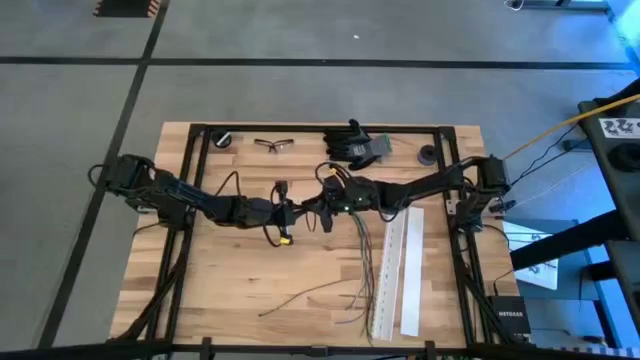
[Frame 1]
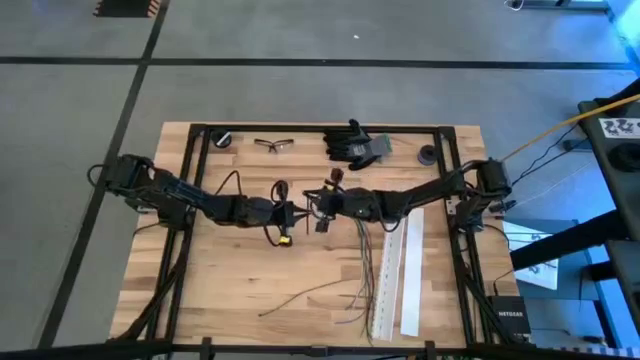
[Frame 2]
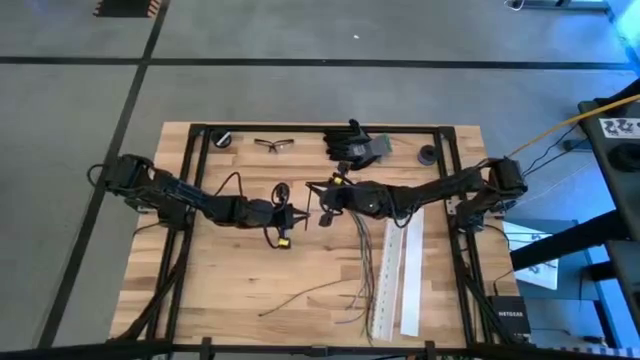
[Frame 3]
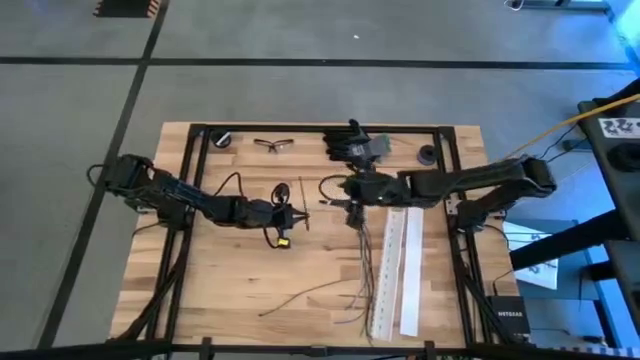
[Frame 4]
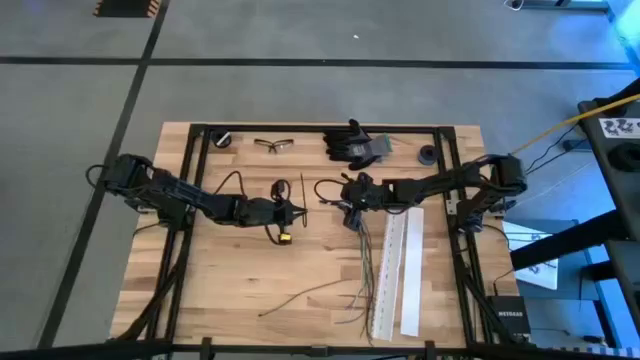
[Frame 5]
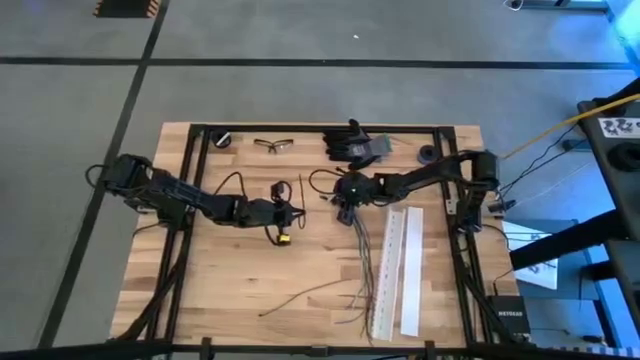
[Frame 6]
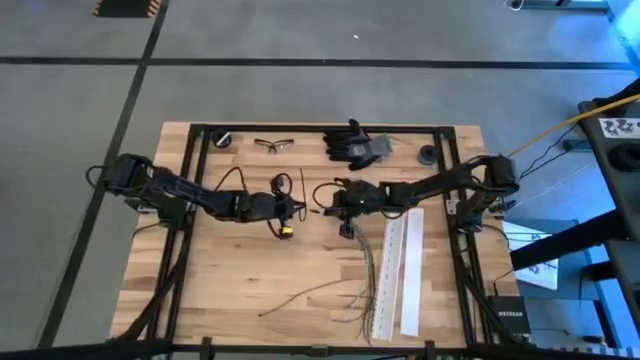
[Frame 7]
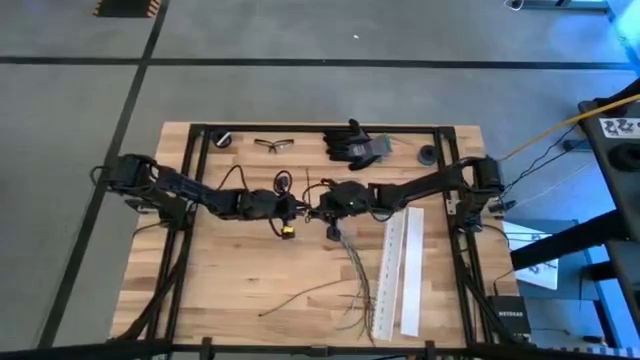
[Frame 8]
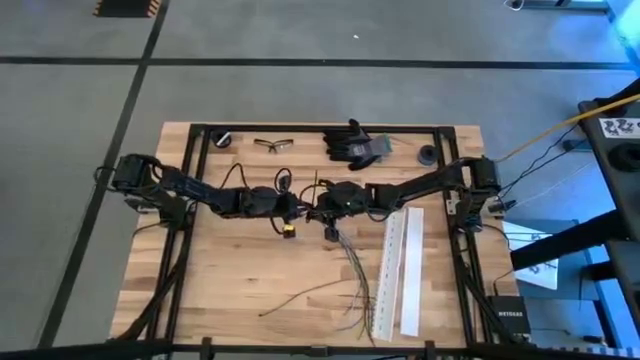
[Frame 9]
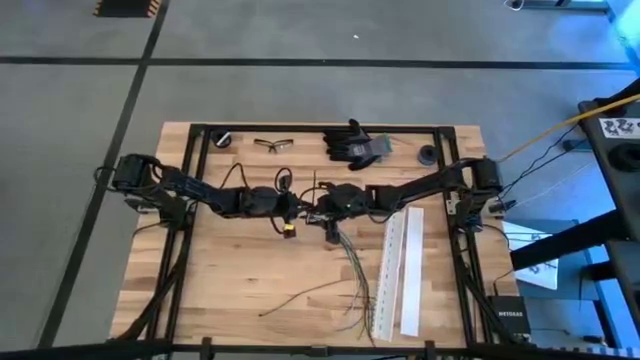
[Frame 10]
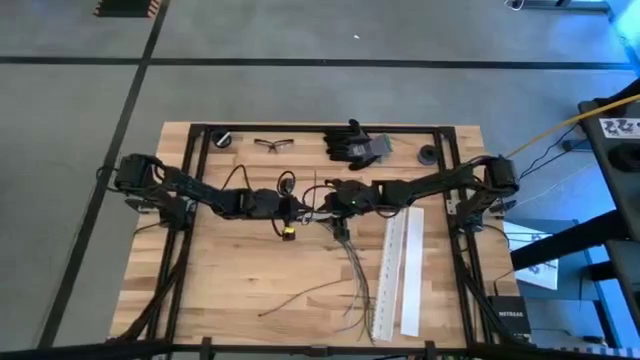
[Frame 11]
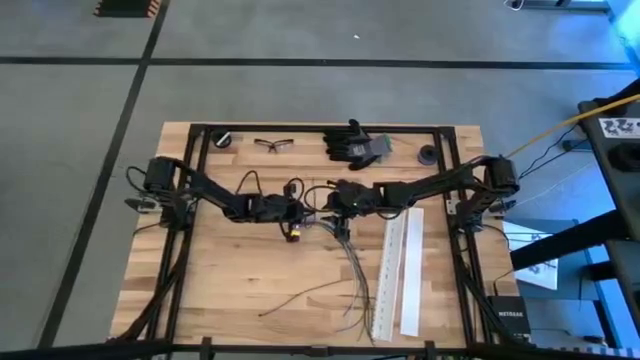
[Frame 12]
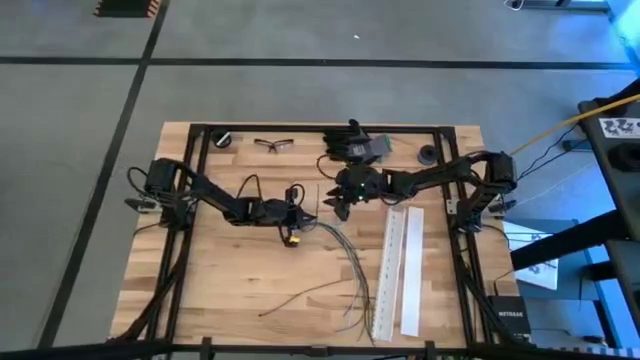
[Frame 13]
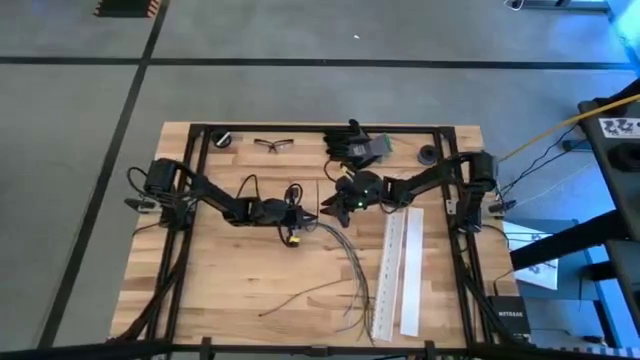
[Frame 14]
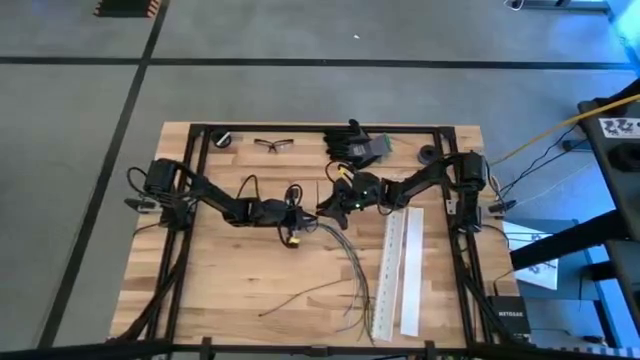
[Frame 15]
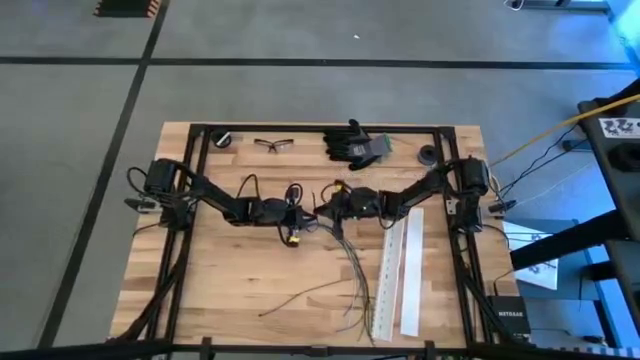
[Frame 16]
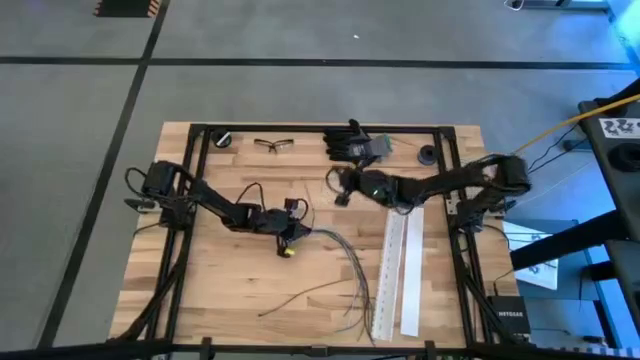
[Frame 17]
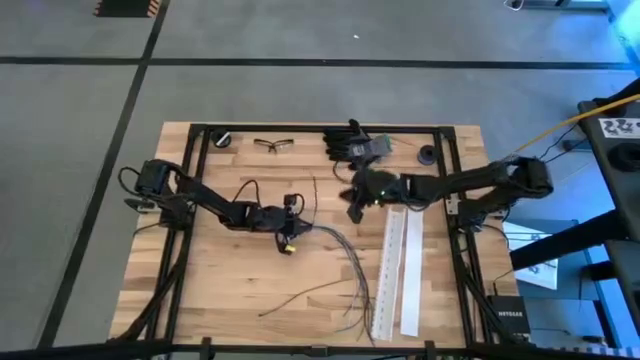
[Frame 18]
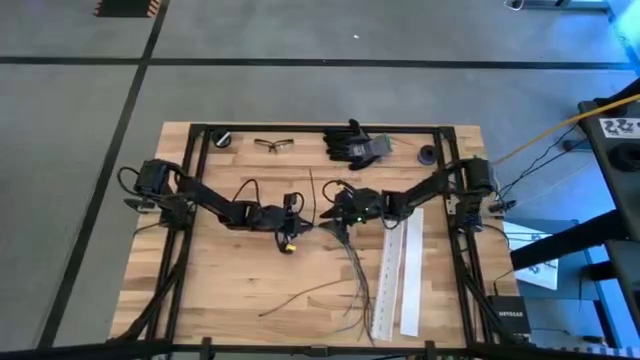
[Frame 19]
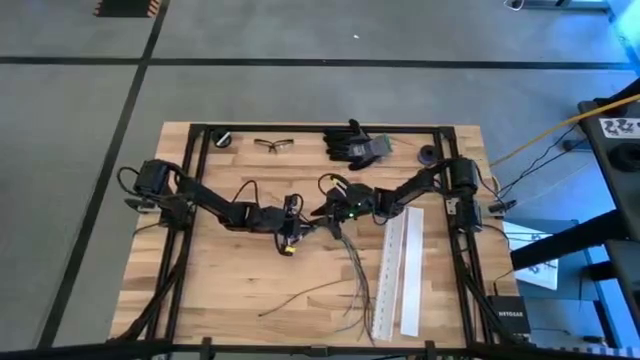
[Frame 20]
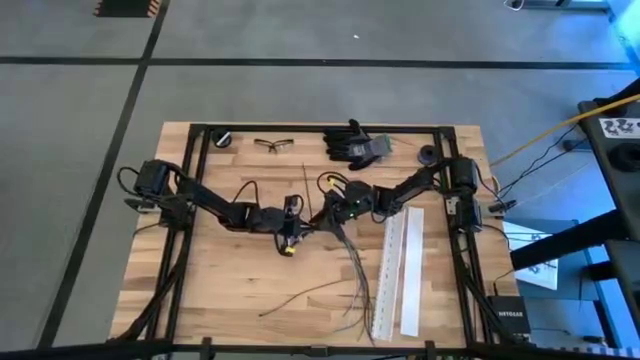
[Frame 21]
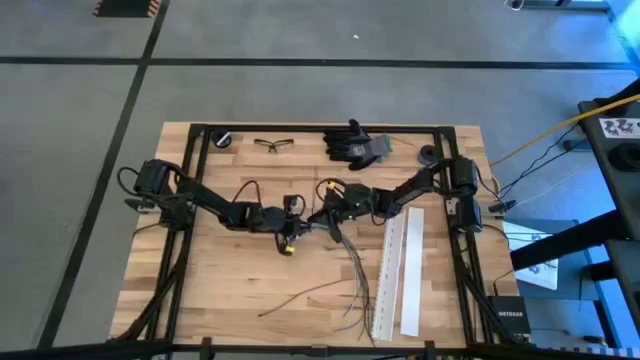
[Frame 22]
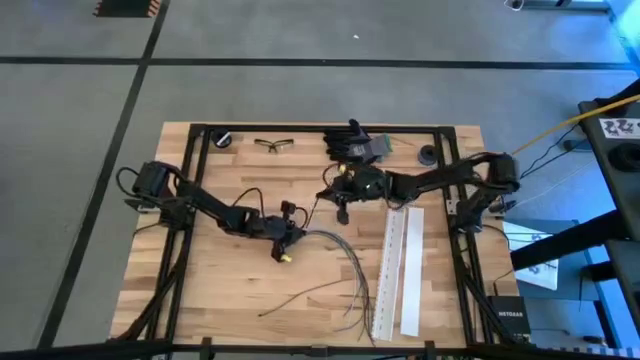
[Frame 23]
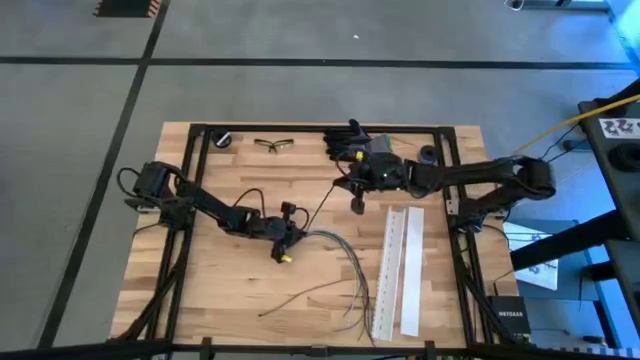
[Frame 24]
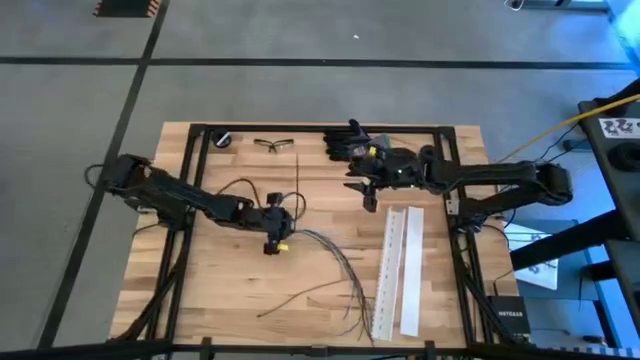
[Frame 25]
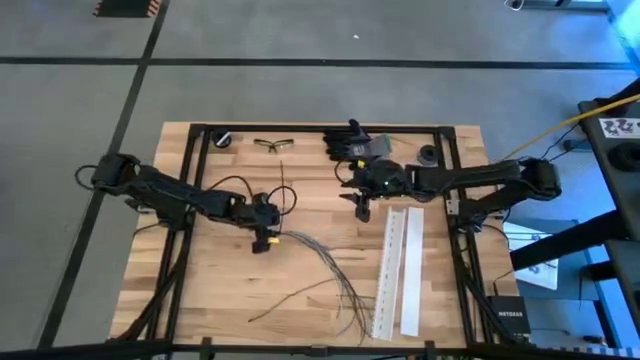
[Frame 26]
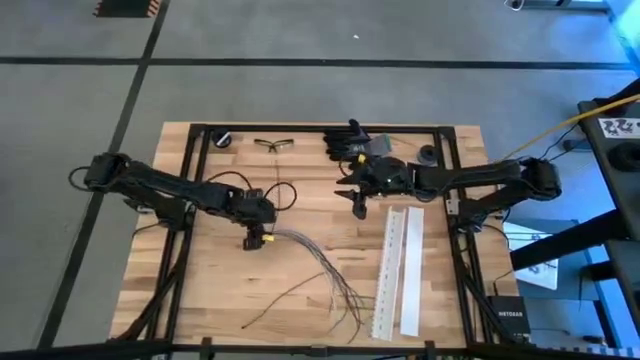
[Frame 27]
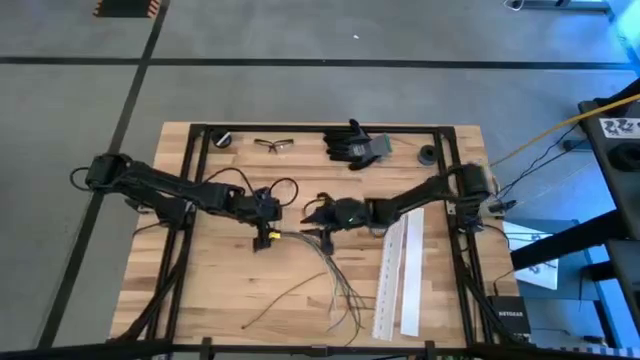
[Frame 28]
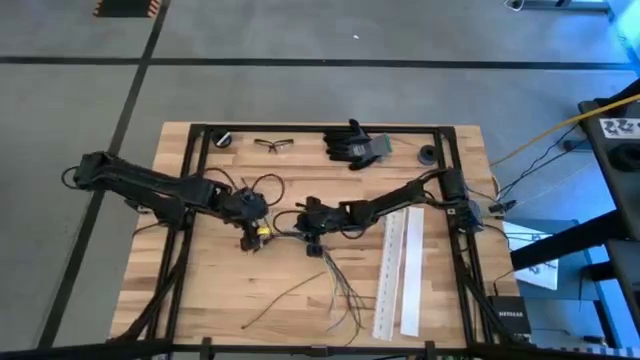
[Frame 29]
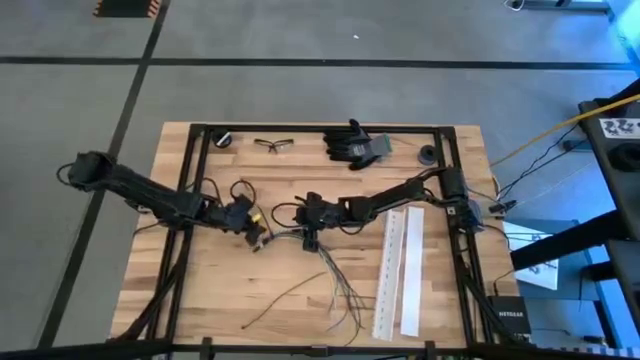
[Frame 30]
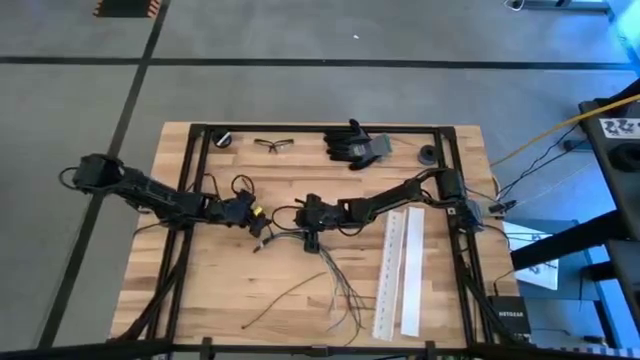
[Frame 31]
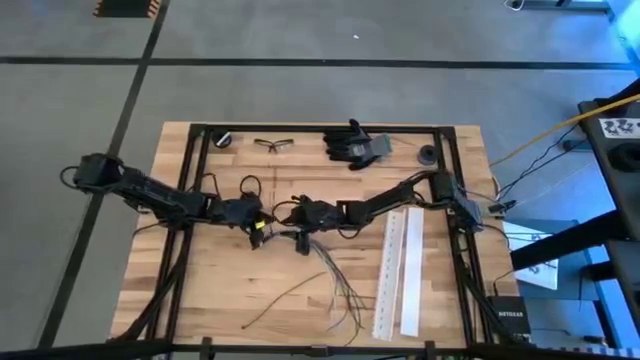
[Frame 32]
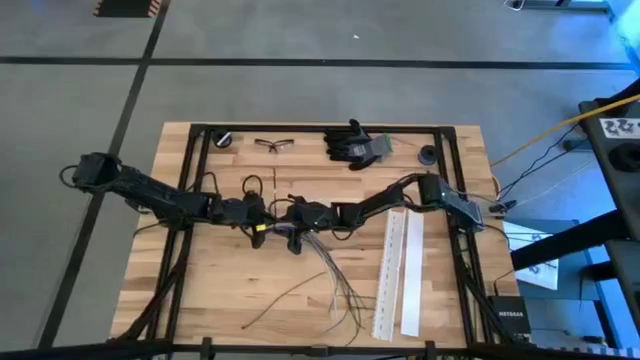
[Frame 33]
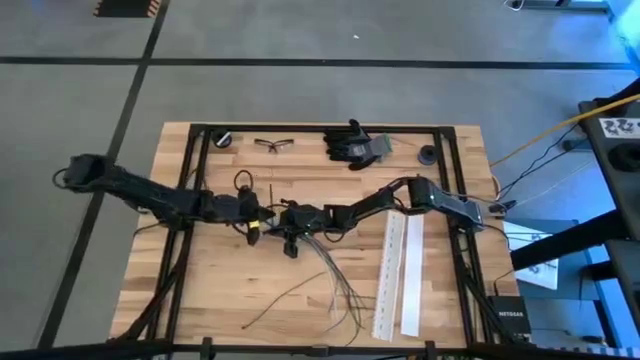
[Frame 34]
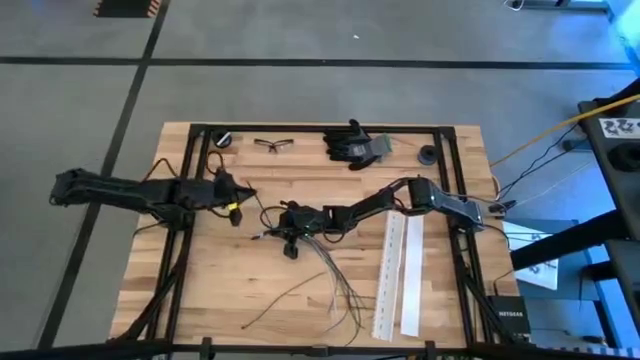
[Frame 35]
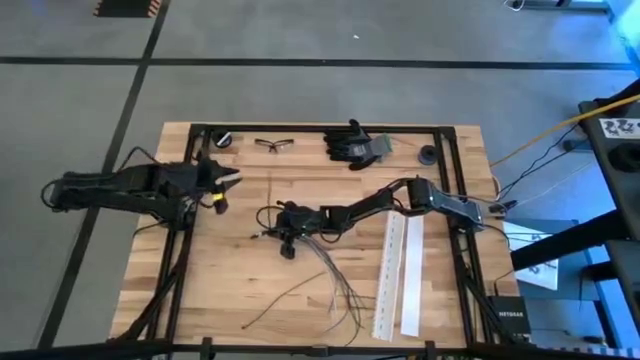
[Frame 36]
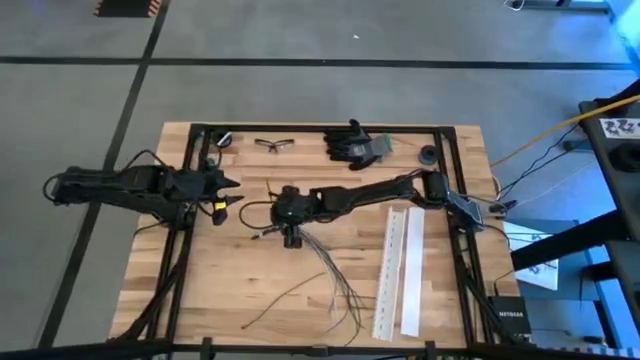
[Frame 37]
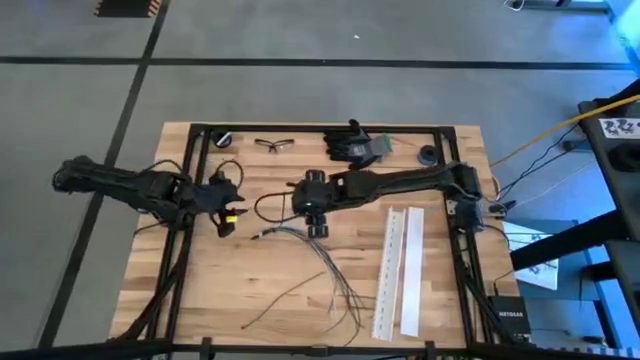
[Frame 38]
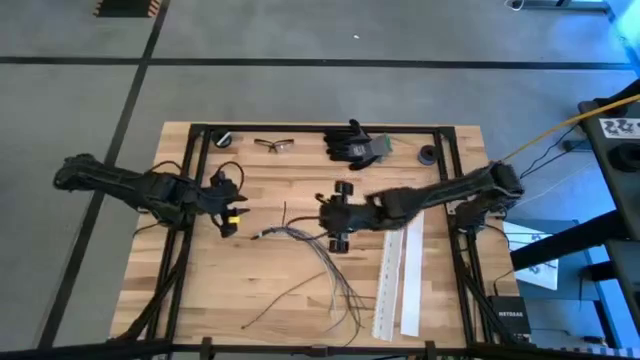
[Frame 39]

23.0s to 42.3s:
Task: Ziptie cables
Wrap the top zip tie on the cables

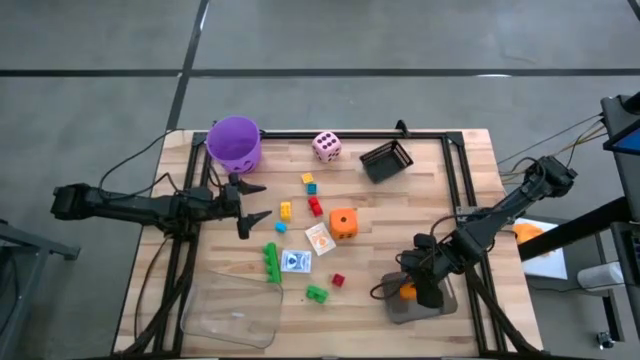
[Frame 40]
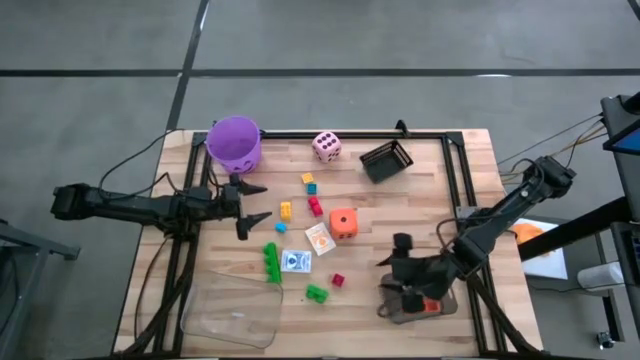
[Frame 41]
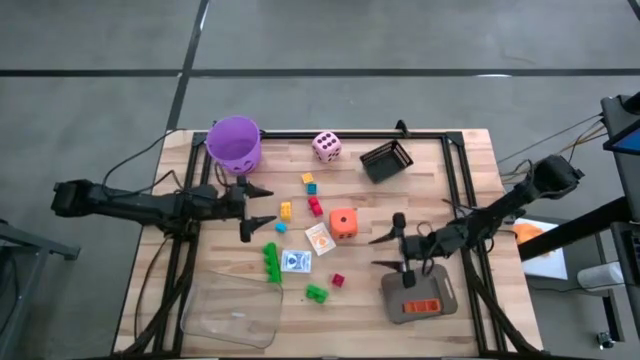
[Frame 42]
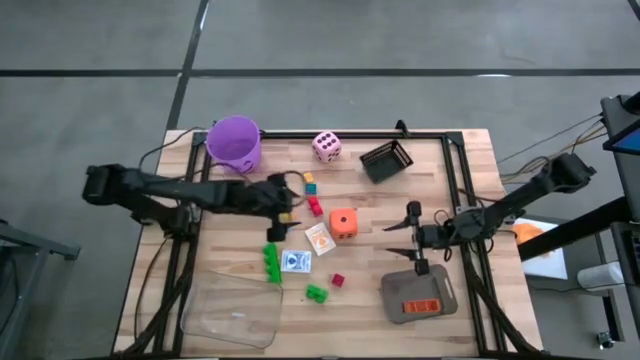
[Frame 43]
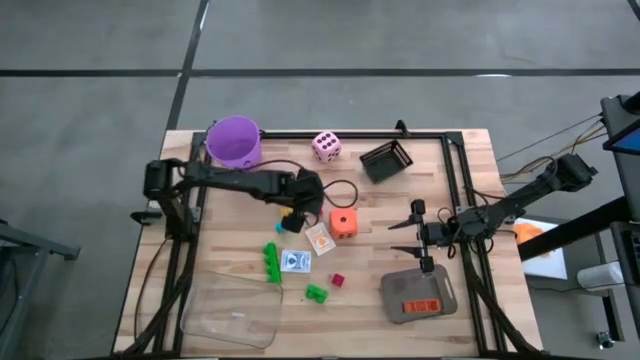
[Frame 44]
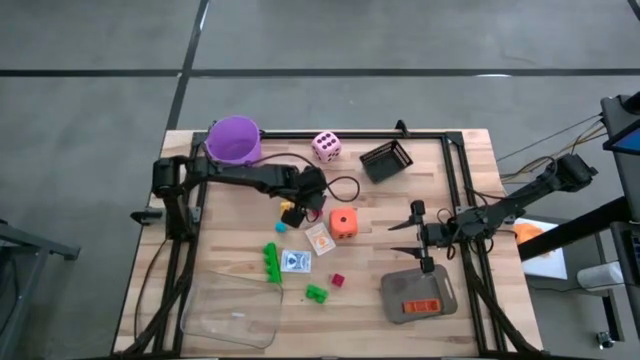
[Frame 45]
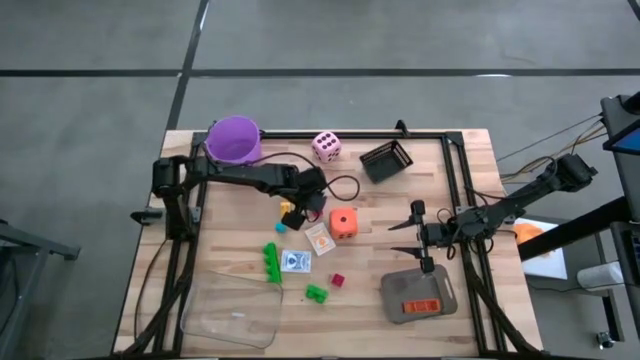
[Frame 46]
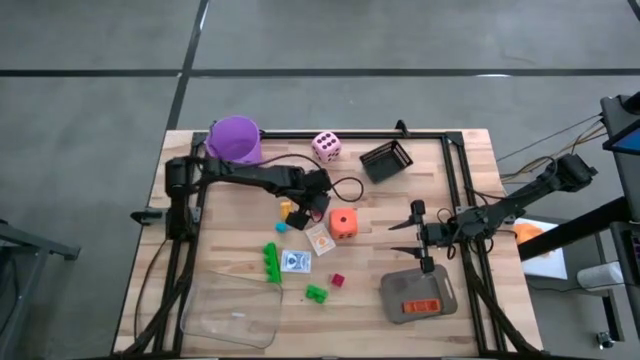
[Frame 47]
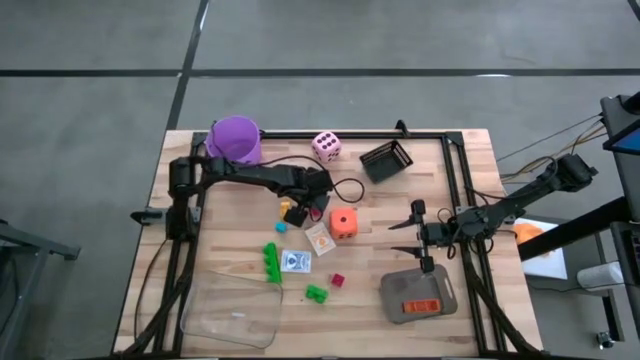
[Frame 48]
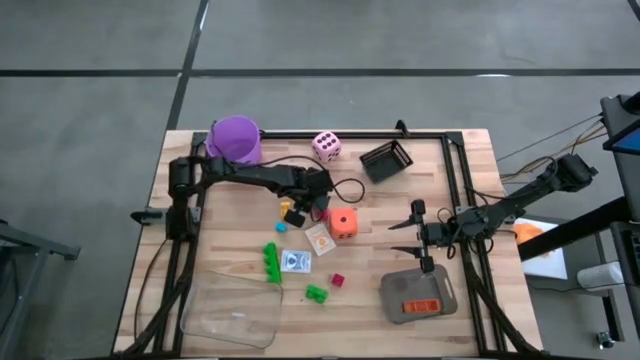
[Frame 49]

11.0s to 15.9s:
Task: Pick & Place Toys
Put the red game piece into the black bin
